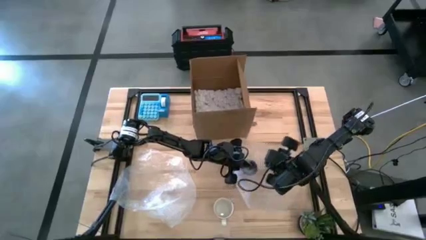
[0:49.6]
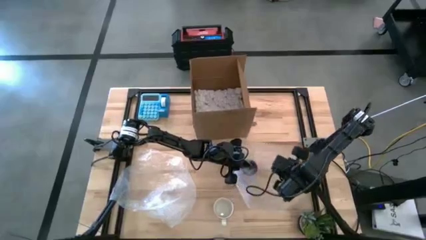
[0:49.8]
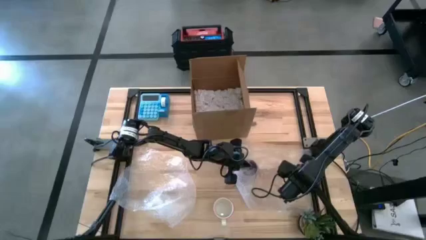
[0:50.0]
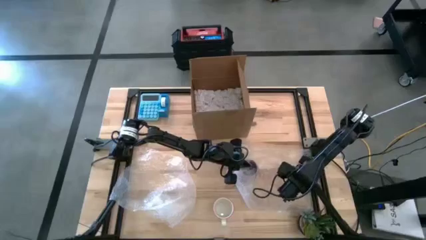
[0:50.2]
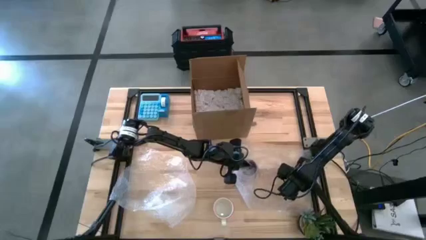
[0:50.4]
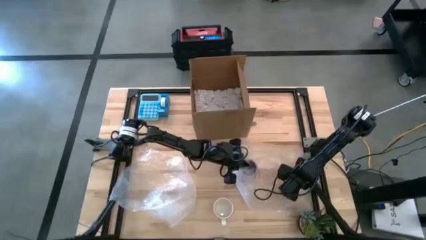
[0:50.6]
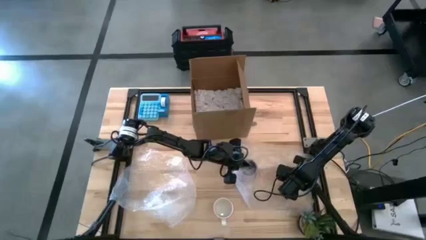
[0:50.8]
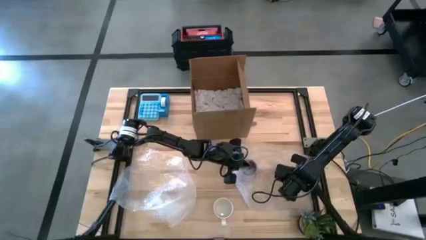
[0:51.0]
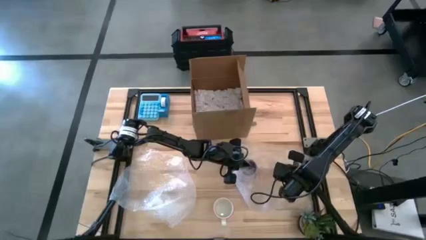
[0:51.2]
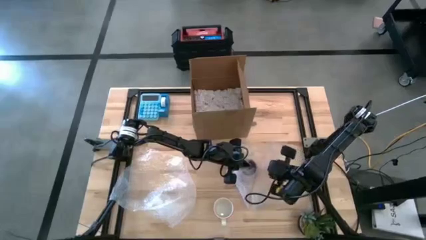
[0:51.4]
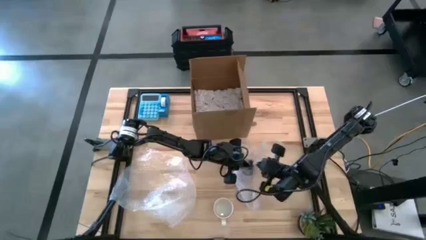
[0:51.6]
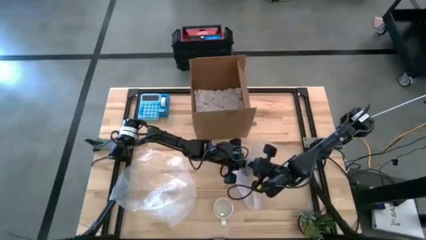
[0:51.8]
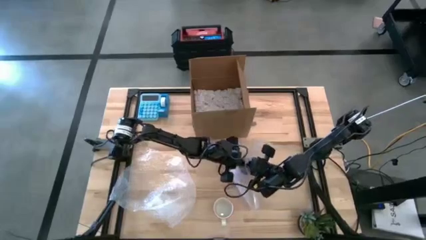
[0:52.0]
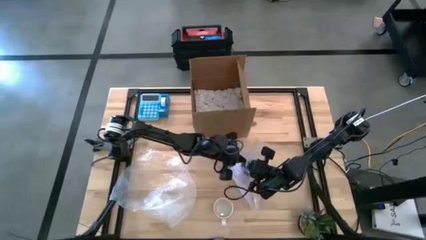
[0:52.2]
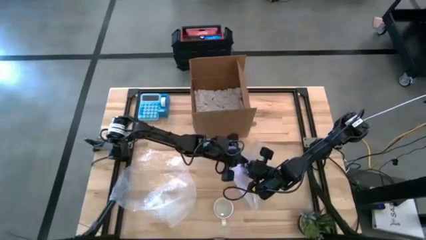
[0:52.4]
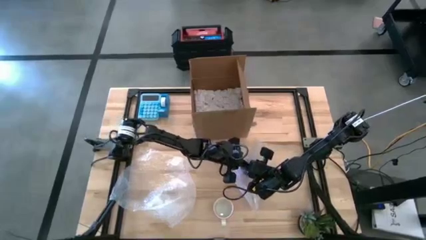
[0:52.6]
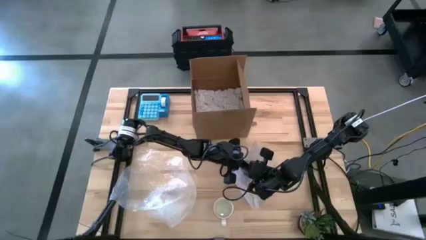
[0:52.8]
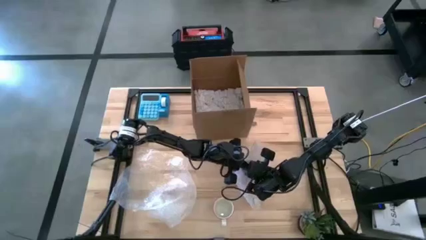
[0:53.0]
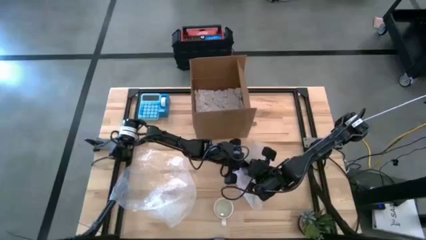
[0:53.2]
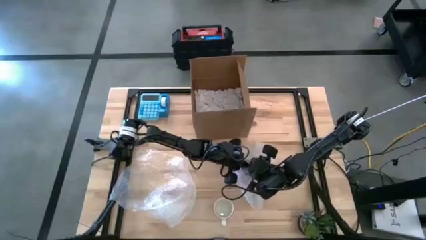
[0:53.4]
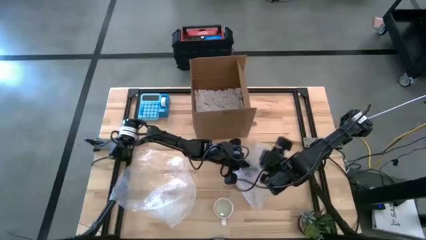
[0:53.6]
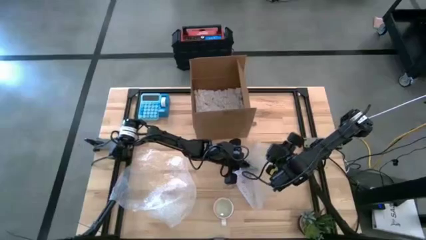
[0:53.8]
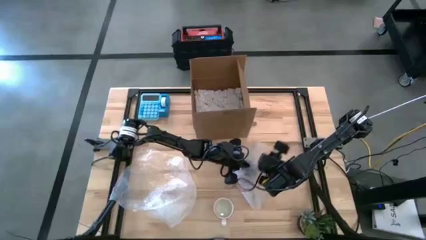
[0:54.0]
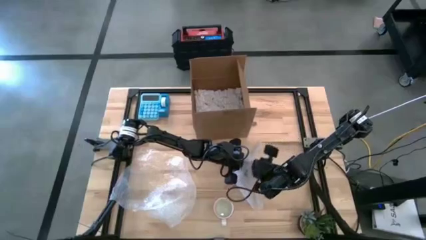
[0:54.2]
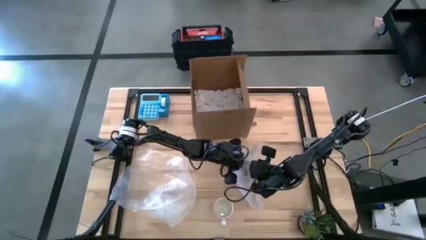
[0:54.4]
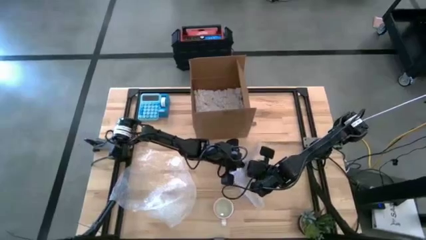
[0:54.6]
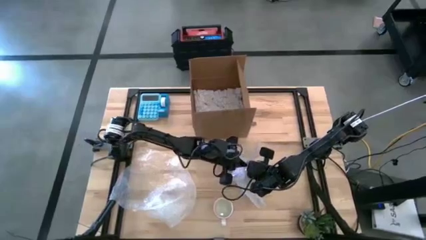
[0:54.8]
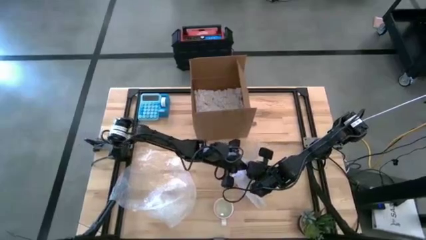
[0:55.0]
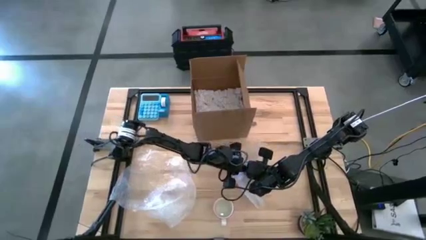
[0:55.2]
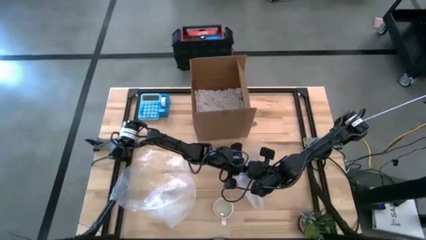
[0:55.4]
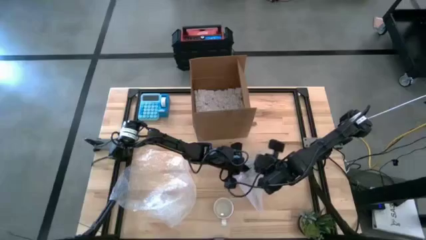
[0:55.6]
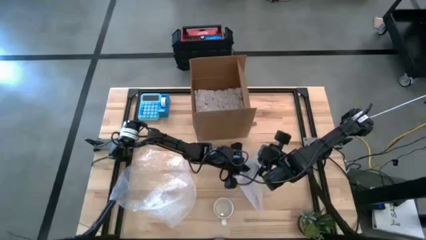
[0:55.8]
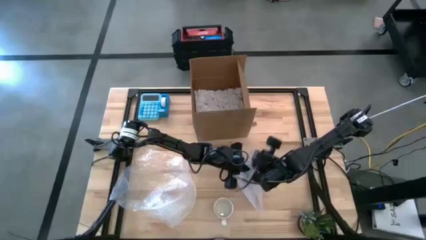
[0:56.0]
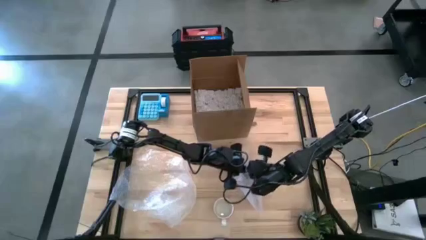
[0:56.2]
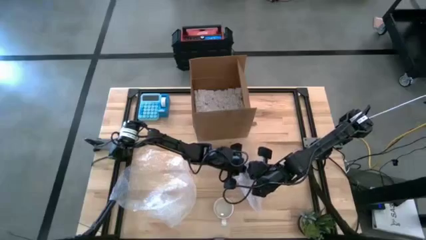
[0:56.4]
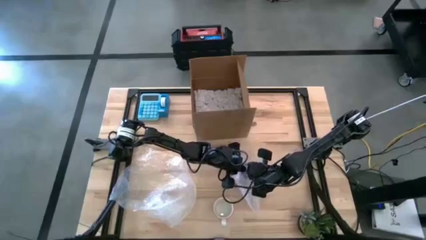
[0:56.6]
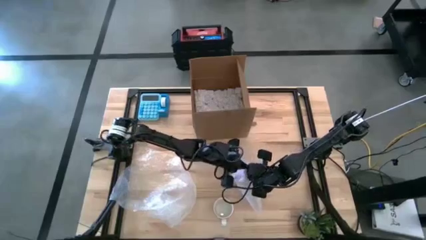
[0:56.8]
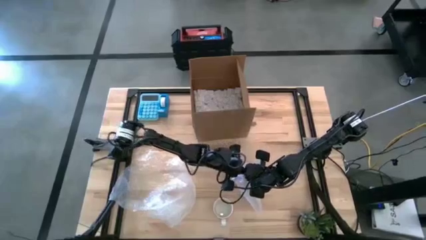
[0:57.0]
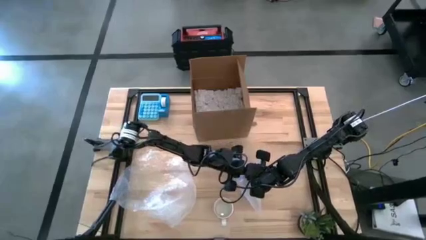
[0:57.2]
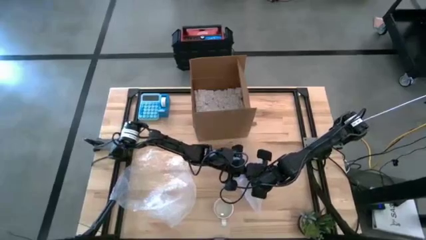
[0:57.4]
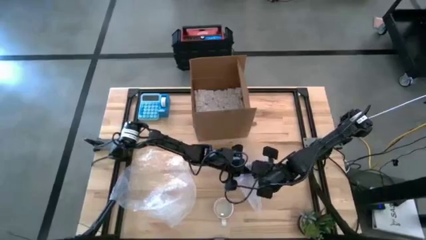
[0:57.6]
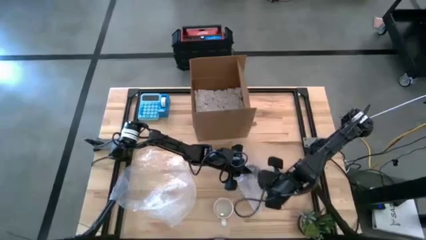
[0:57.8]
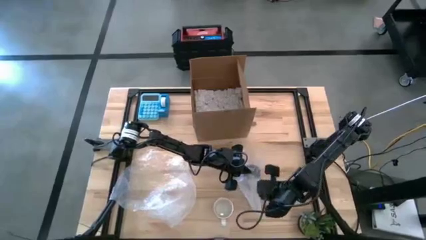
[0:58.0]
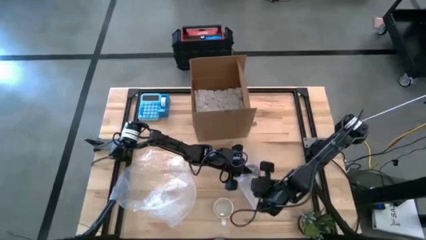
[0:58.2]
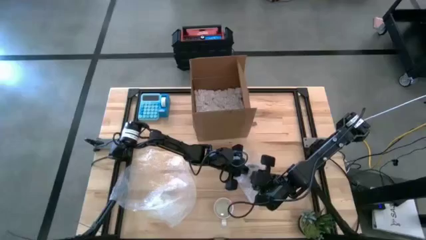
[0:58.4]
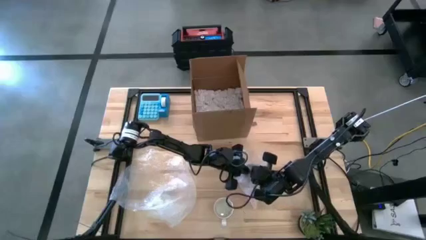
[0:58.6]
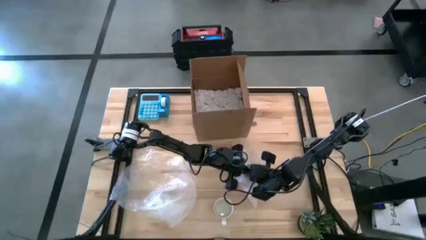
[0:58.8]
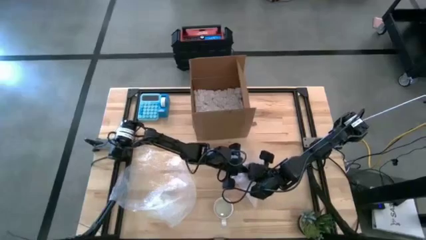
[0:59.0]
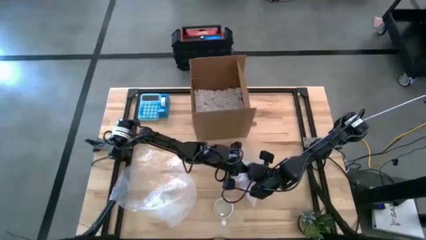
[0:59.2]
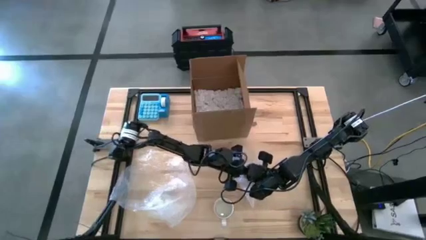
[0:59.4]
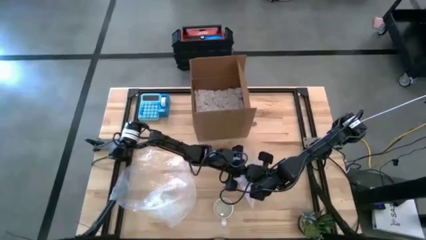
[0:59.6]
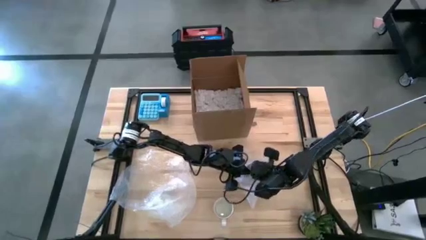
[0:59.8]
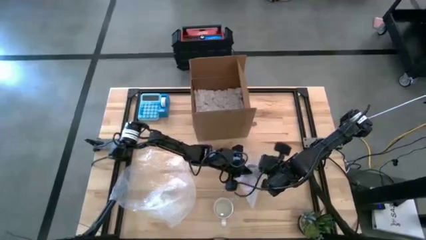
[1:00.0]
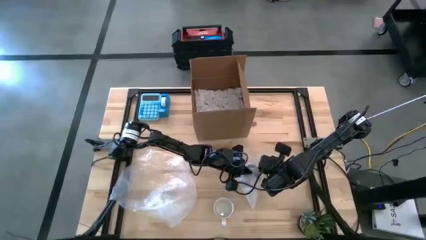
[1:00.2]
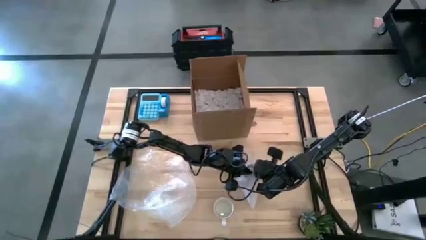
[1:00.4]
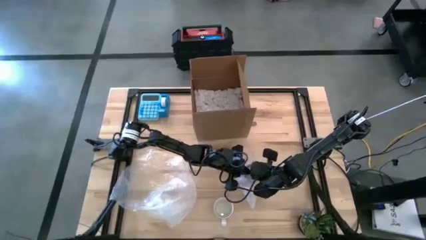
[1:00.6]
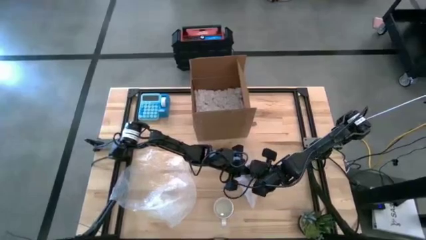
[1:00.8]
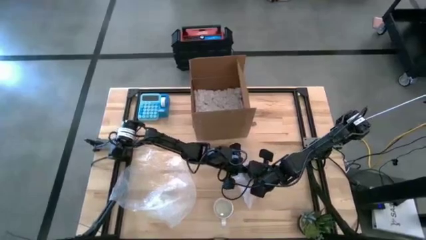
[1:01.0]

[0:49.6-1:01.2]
Task: wrap mug
Wrap the purple mug using the right bubble wrap

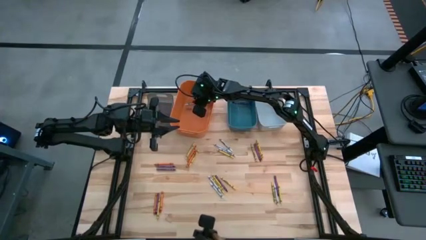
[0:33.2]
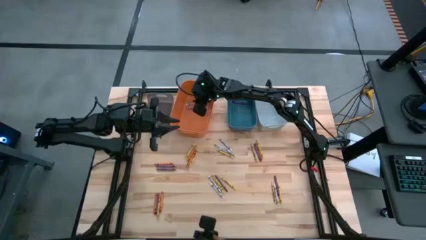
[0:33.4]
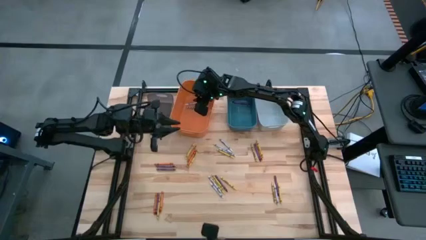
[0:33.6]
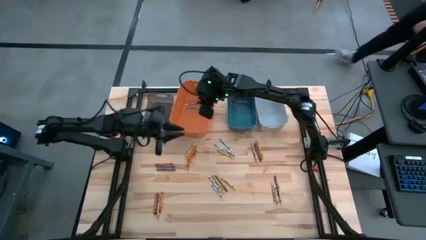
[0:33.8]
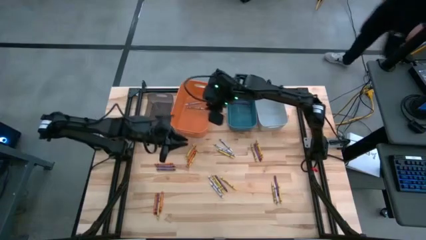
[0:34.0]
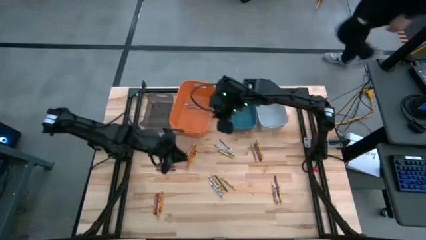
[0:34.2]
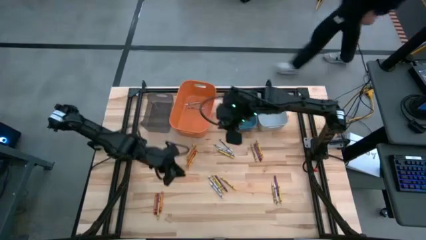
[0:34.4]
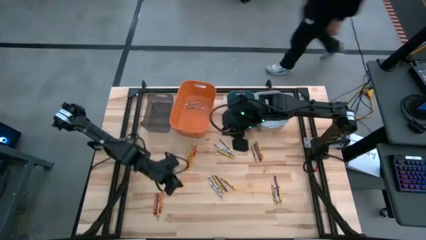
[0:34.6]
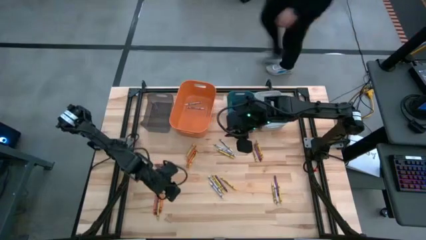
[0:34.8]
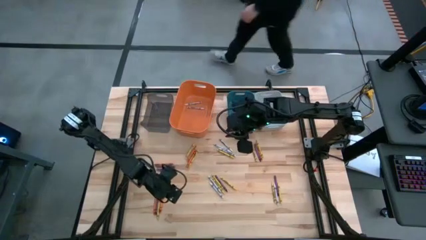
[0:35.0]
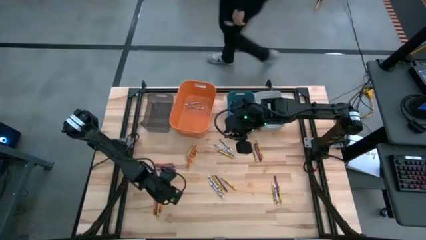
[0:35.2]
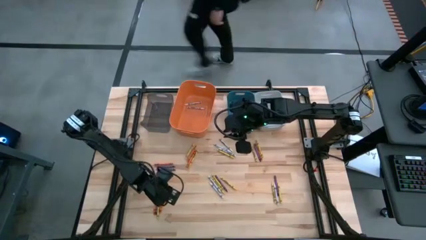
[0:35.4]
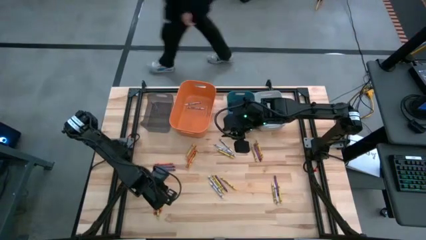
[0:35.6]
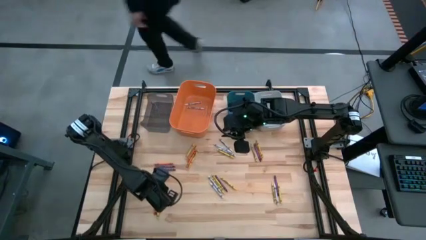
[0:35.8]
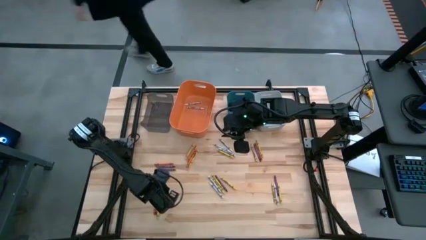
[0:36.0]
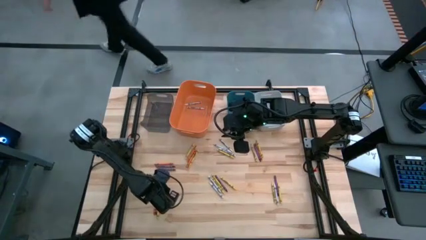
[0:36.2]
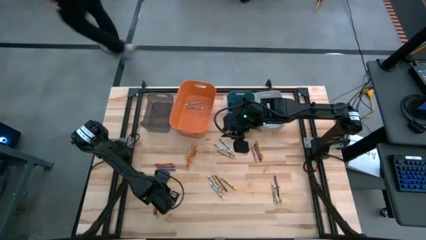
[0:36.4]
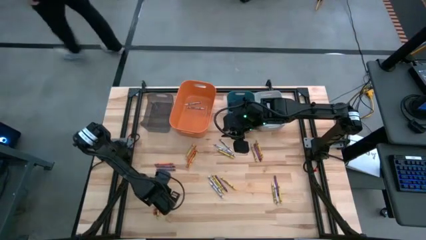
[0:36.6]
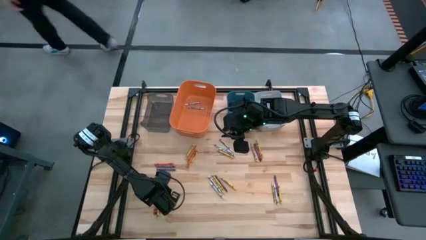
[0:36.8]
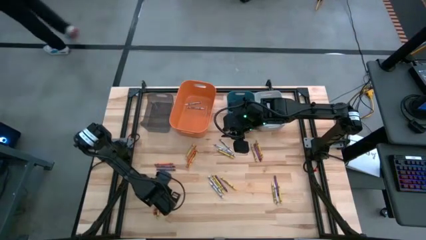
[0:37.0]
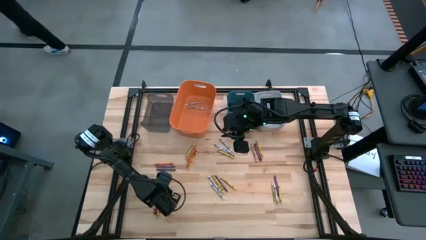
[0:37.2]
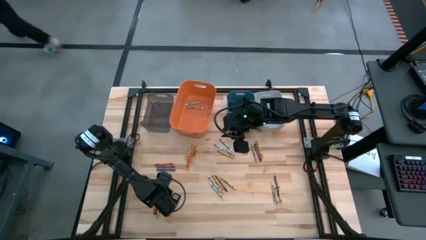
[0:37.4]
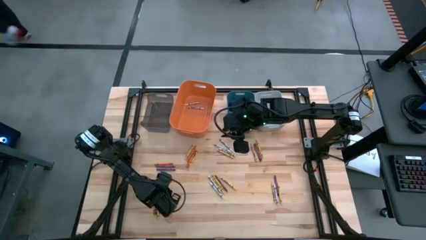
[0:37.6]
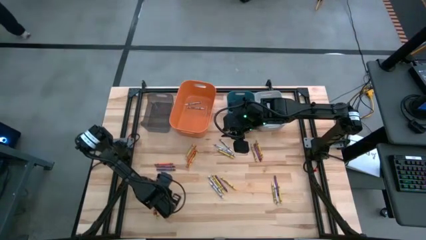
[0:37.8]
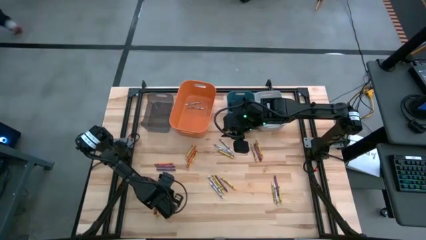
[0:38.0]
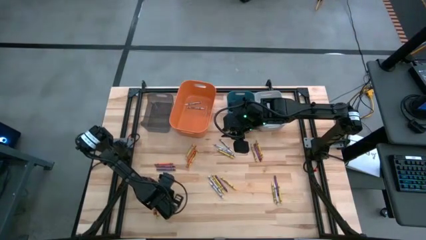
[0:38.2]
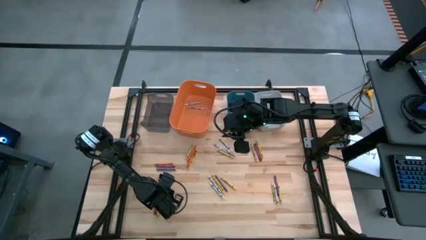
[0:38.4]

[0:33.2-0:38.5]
Task: Sort crayons
Put the orange crayon into the black bin
